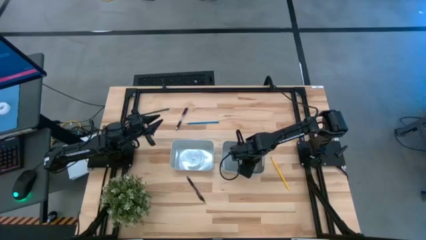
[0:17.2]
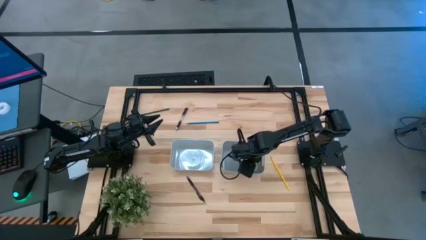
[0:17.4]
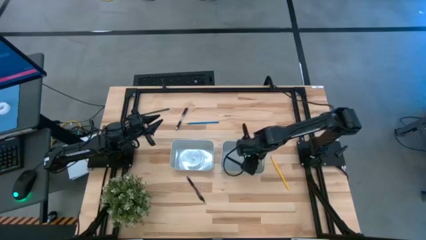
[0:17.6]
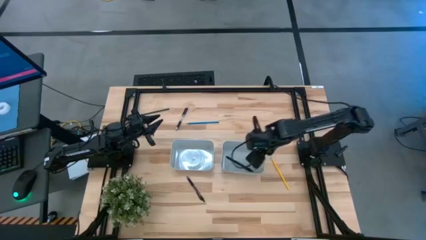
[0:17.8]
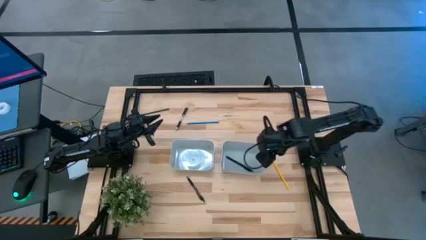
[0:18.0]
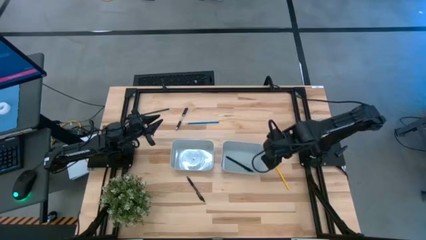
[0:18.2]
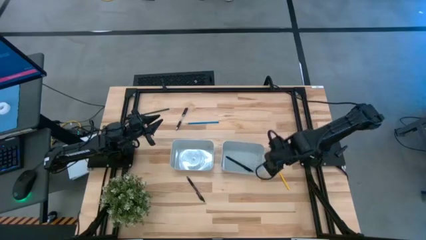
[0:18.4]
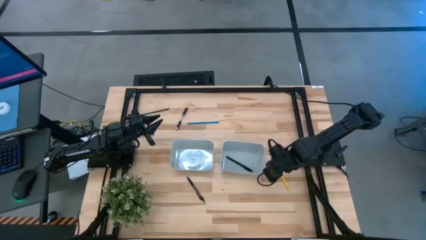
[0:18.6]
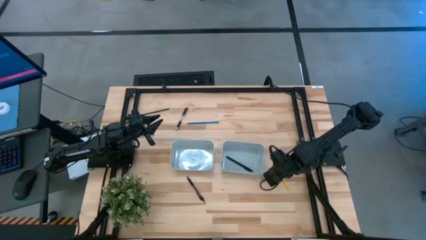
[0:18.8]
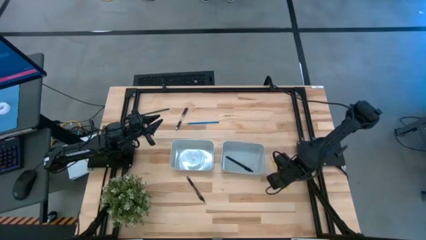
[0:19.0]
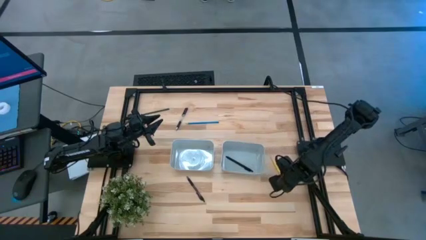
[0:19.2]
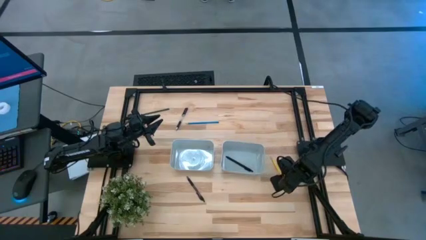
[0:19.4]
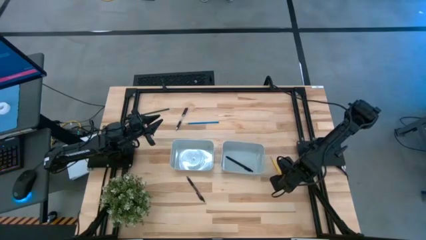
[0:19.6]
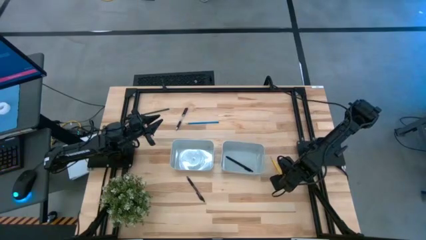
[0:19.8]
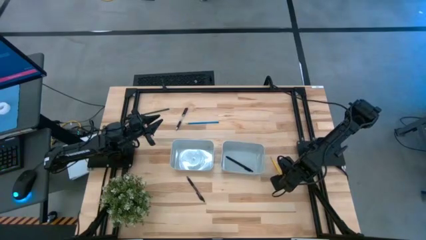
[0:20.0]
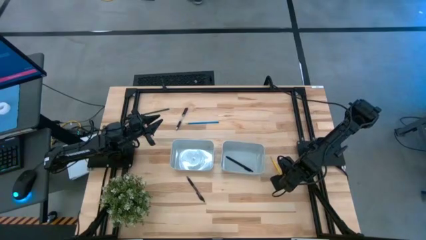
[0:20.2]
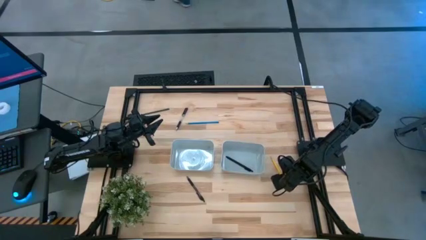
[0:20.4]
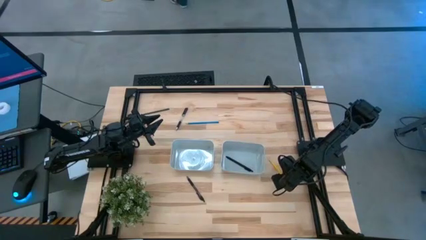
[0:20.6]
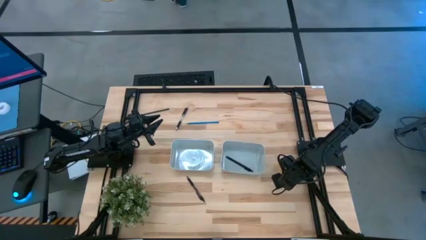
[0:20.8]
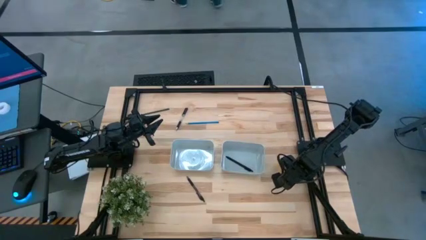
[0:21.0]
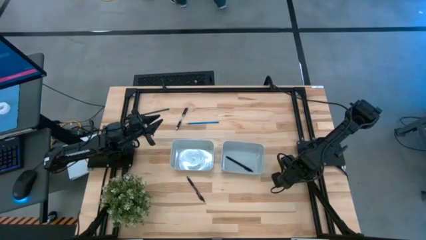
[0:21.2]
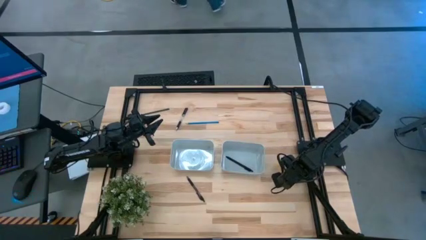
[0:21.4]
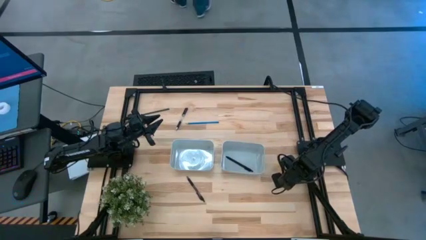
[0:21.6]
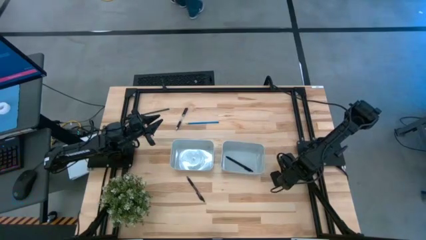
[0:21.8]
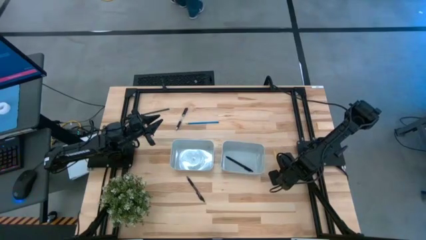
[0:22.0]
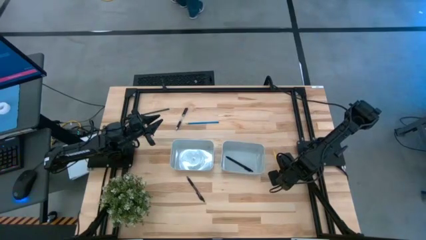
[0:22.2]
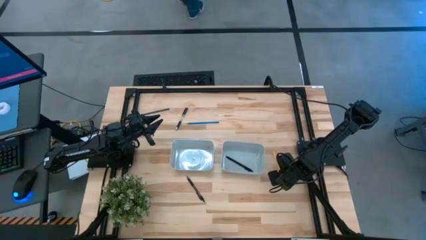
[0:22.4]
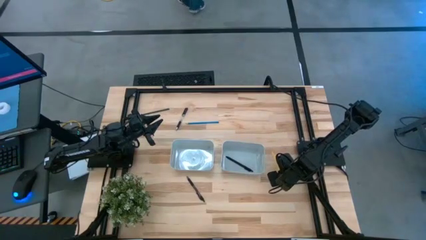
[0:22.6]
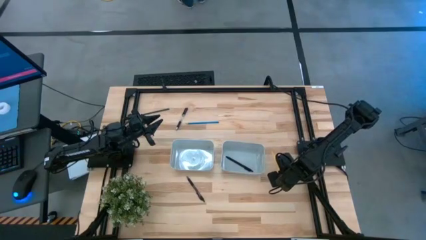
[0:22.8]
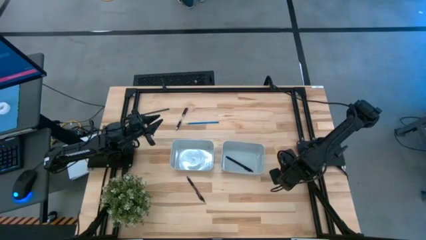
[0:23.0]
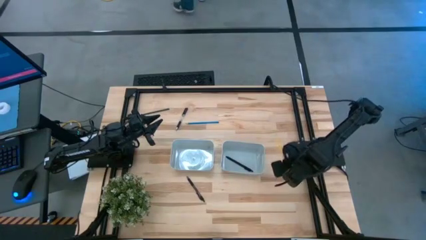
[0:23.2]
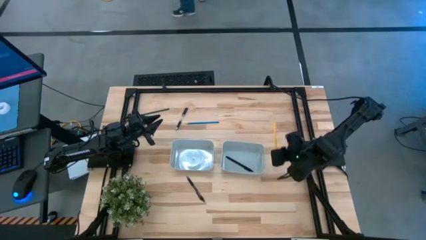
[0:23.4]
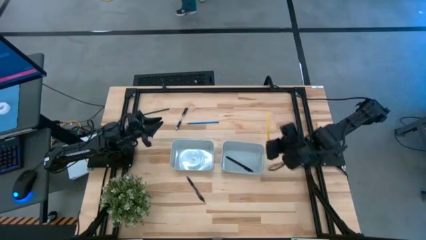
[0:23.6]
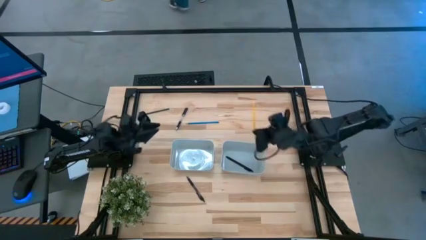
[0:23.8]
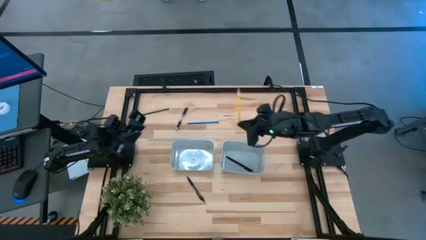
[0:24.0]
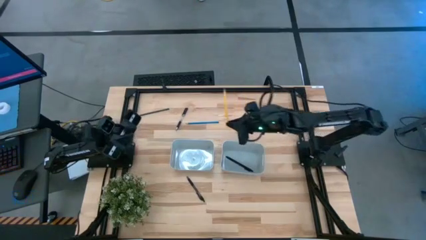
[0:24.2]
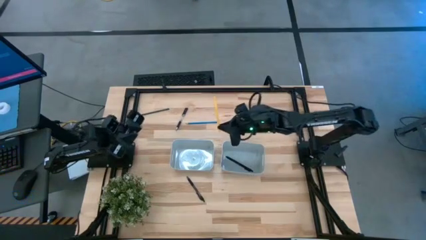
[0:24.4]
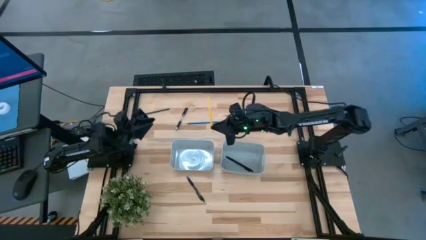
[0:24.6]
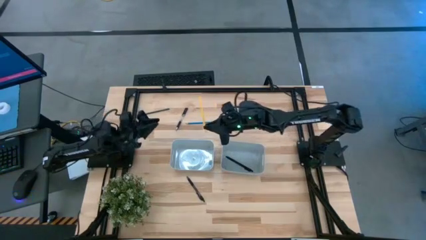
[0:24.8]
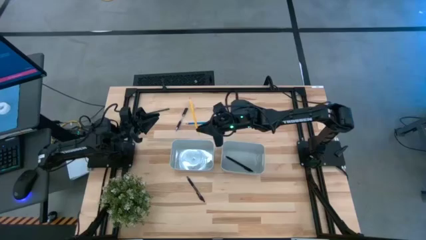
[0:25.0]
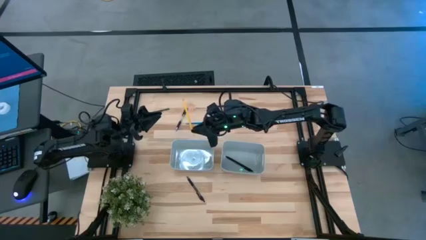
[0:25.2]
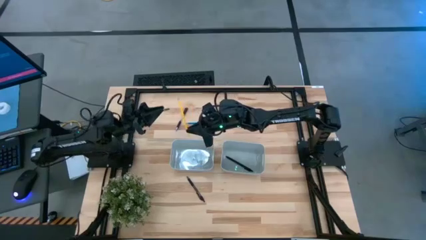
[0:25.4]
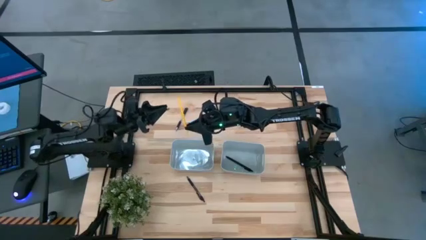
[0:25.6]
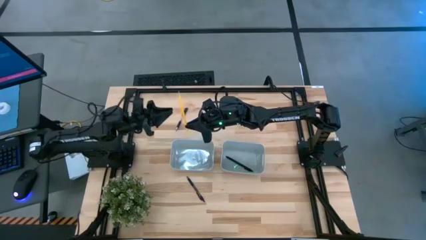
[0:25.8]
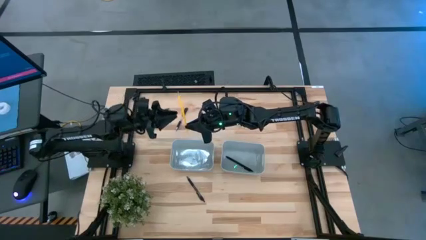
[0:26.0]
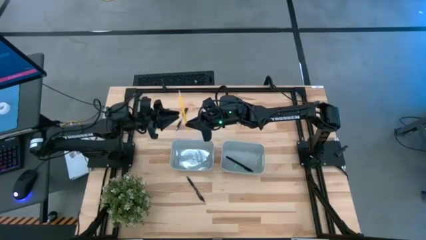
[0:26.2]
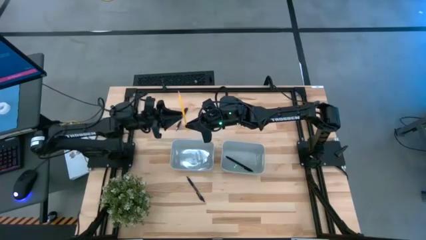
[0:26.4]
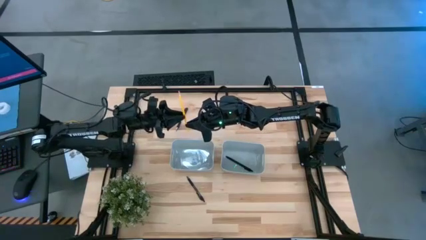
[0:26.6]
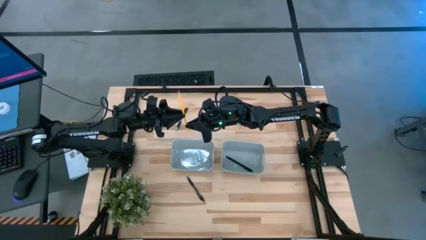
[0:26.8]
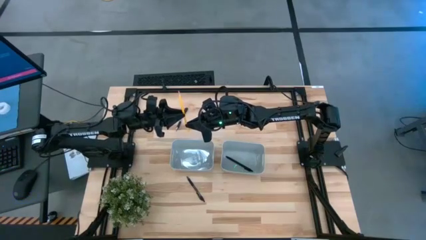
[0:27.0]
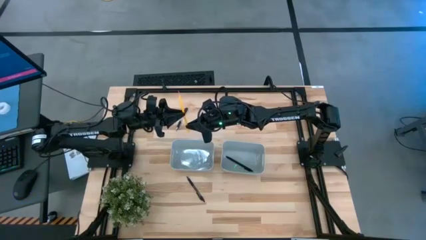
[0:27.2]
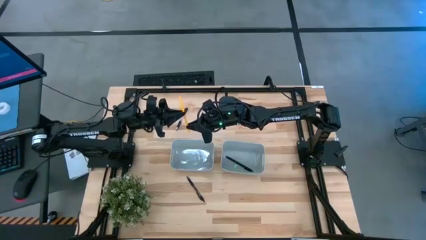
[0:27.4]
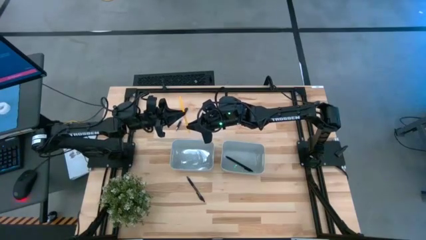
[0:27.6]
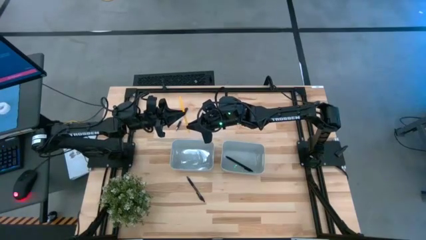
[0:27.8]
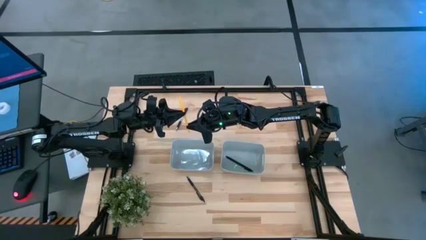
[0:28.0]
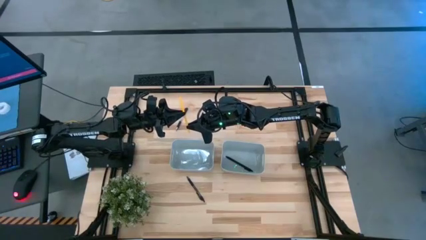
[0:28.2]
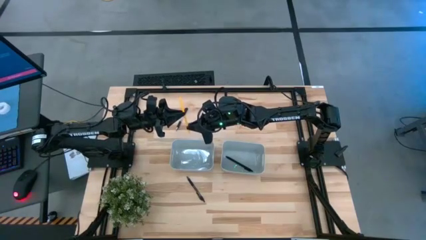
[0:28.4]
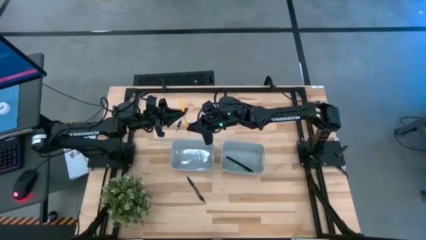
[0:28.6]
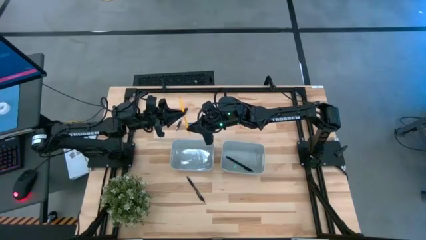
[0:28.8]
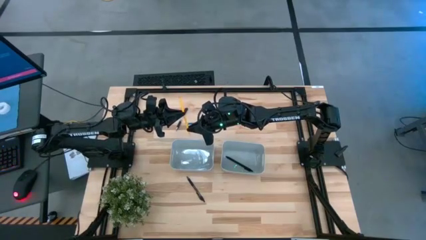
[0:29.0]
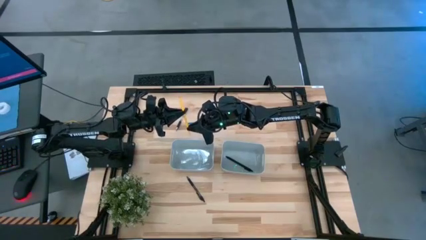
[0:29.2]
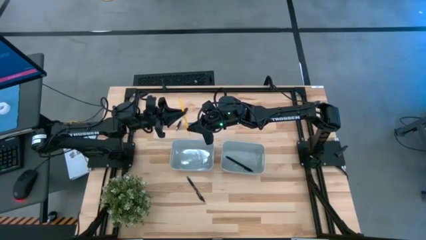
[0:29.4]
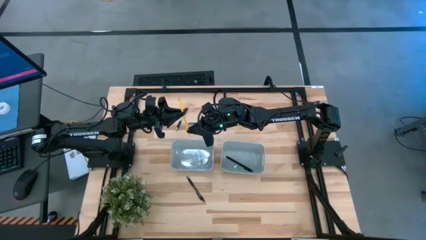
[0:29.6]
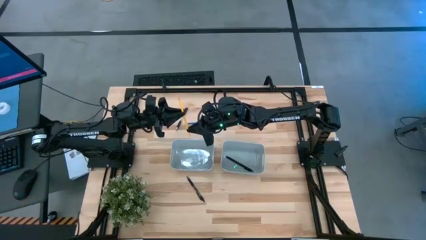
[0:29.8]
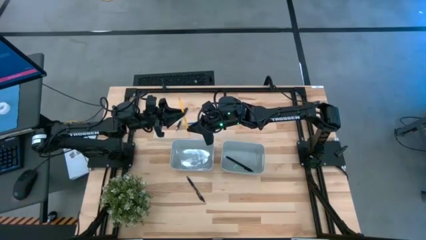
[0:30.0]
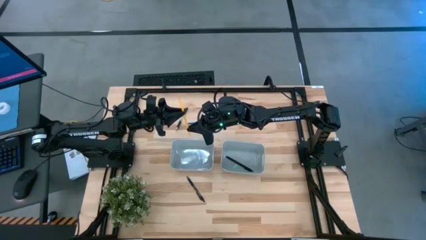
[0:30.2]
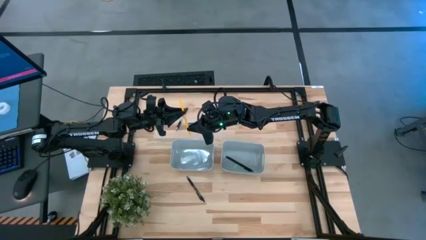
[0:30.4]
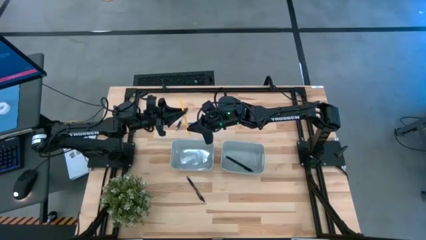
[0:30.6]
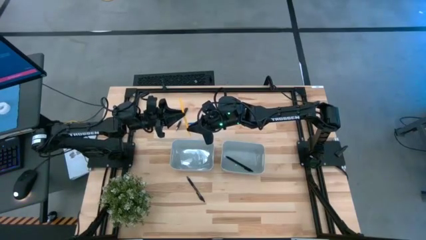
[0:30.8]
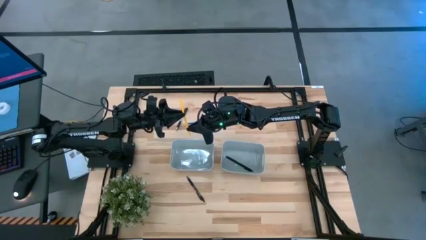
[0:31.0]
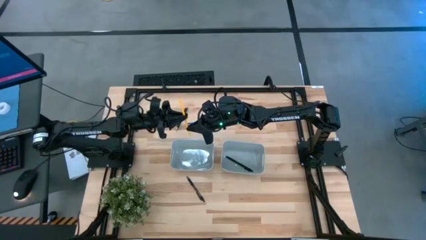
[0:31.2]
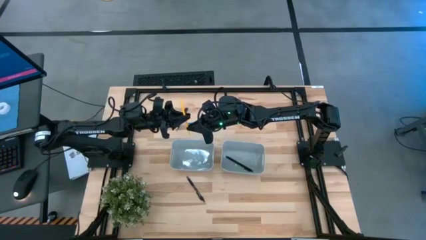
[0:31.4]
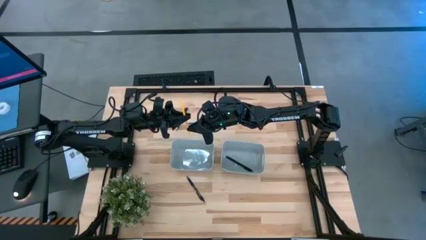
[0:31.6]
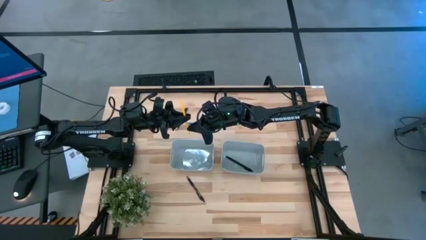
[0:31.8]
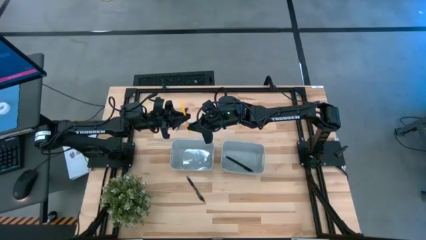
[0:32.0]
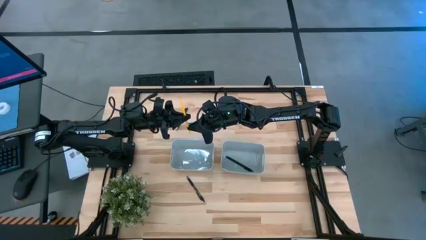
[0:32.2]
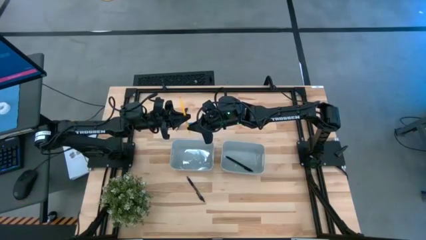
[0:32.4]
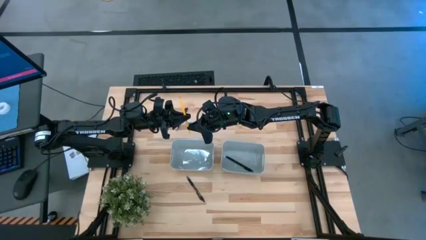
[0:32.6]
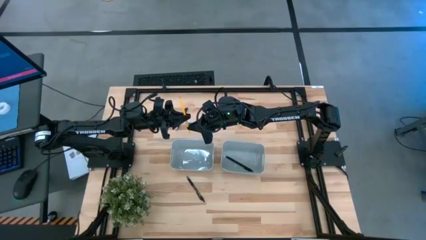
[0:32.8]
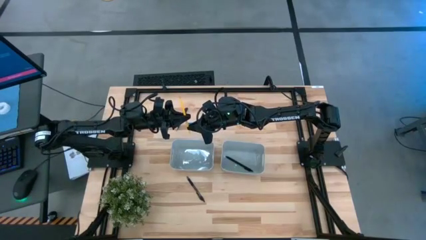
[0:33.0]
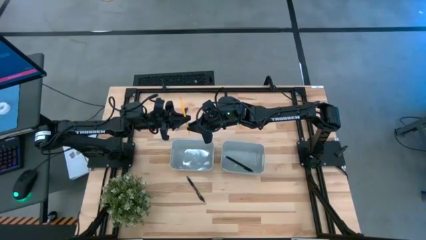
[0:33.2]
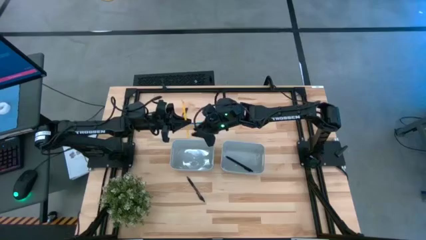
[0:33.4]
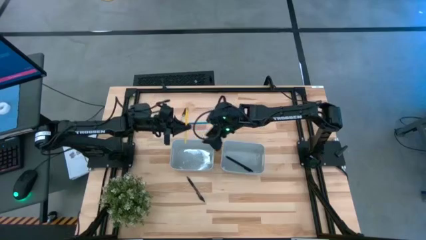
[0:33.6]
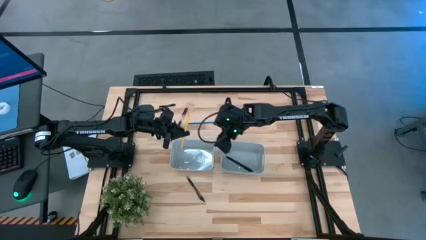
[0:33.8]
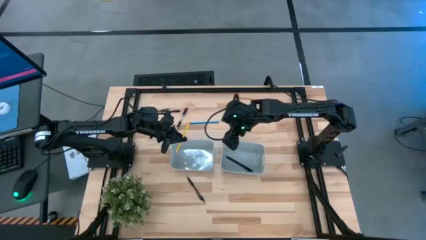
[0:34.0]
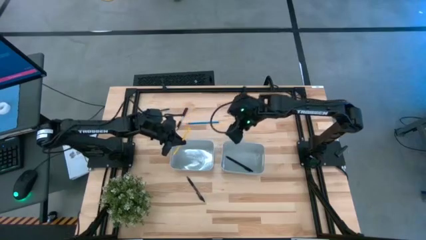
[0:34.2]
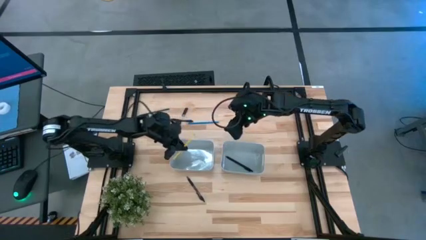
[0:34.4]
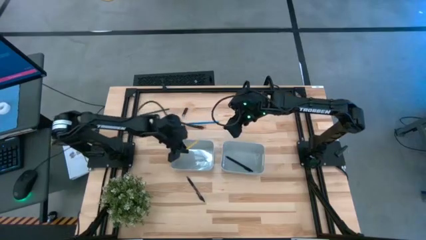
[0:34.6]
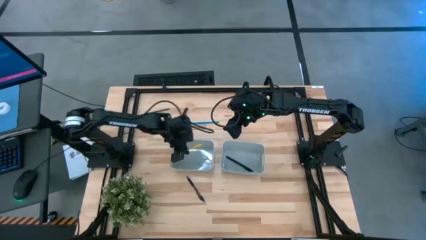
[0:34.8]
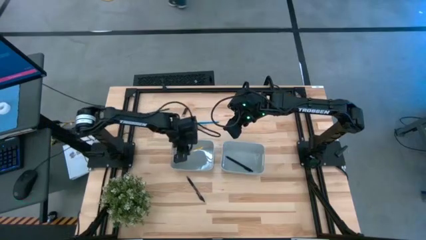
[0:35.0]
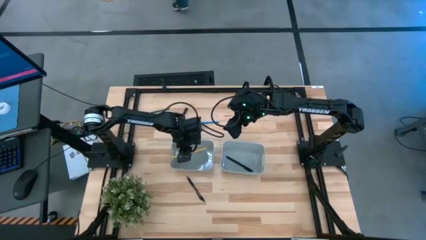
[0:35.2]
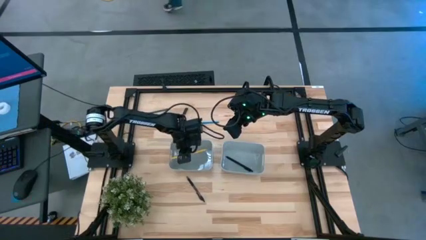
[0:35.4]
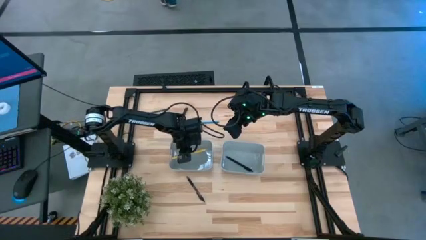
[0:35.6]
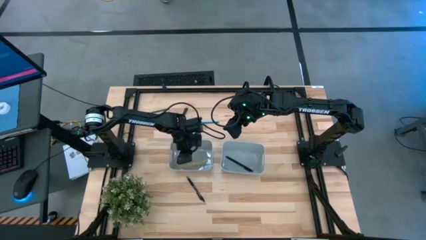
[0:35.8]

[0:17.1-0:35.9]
Task: Sort pens & pencils
Put the yellow pencil into the left gray bin
